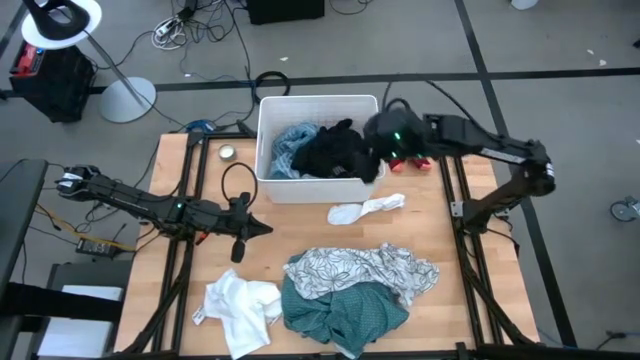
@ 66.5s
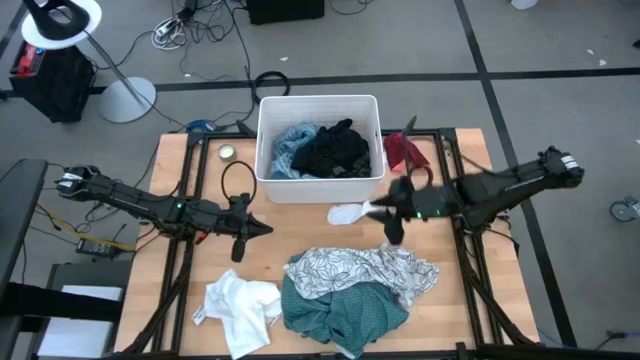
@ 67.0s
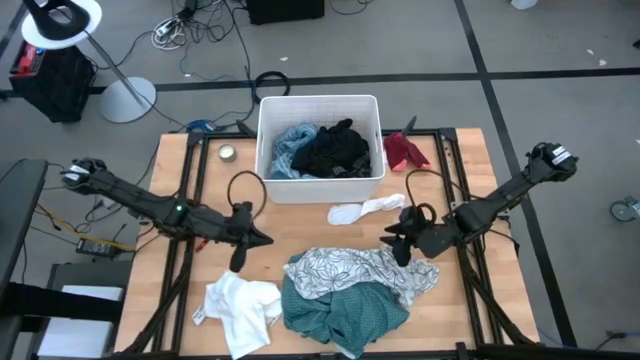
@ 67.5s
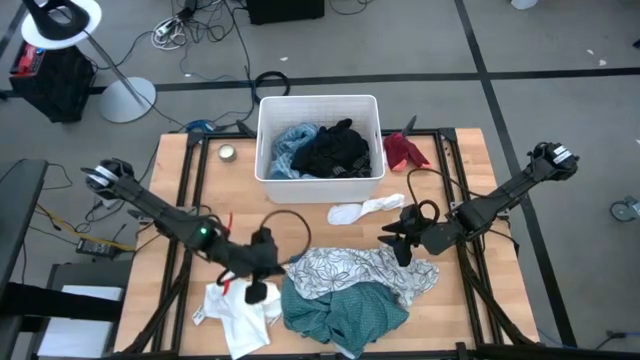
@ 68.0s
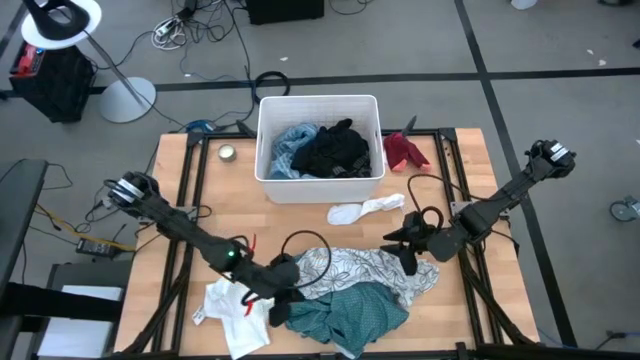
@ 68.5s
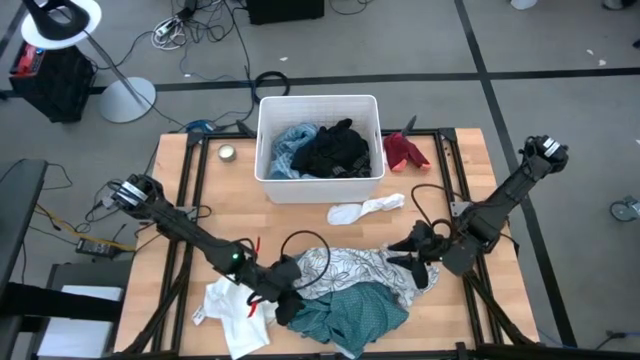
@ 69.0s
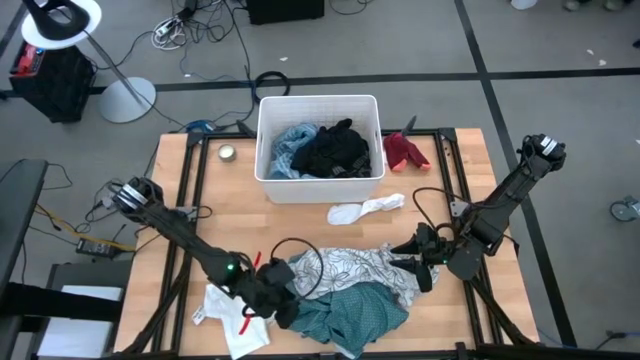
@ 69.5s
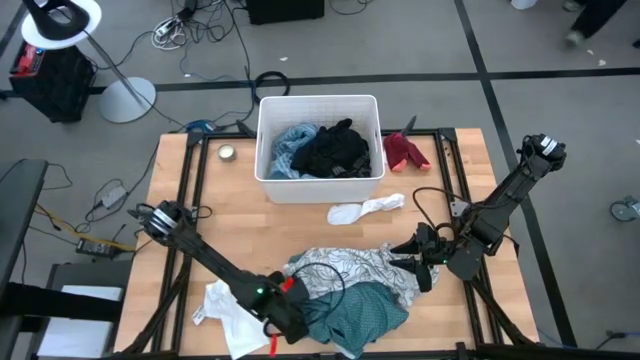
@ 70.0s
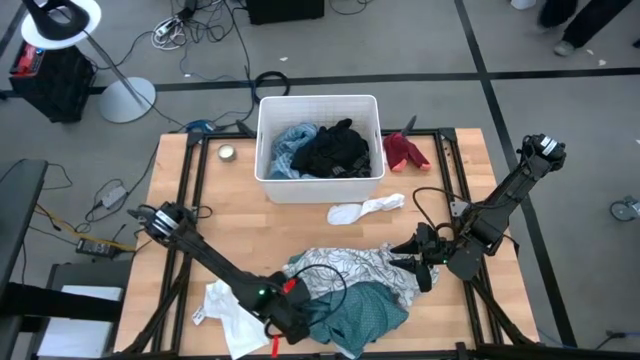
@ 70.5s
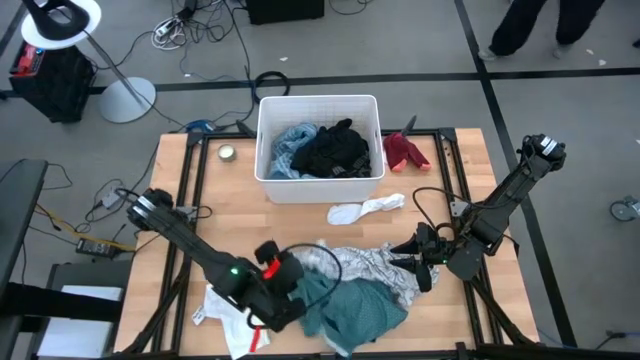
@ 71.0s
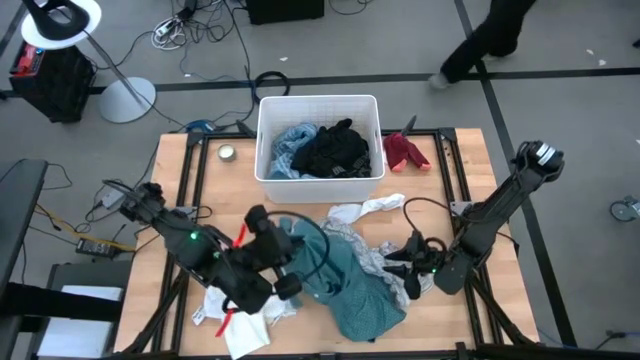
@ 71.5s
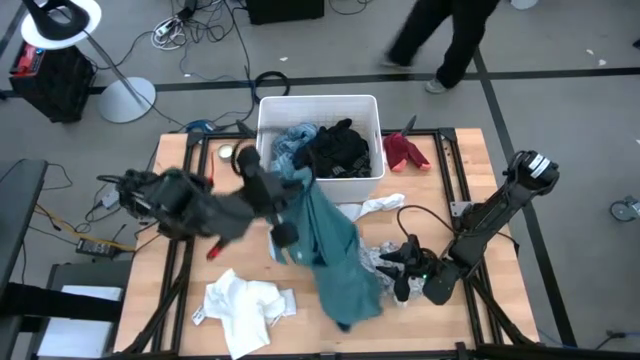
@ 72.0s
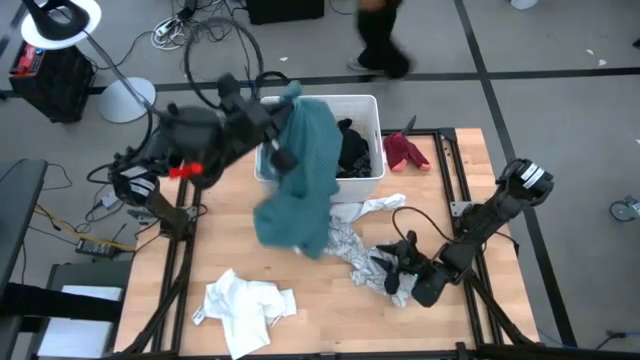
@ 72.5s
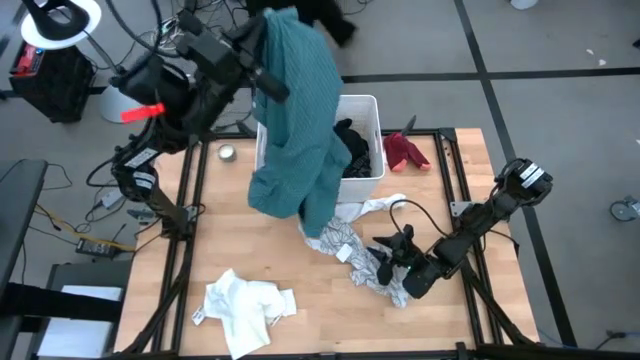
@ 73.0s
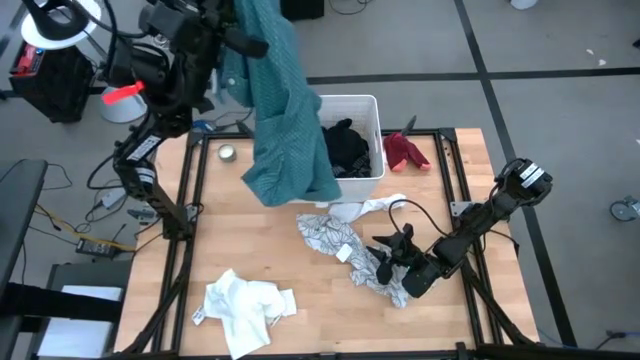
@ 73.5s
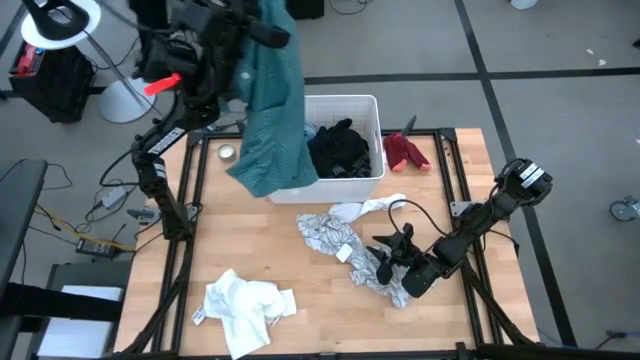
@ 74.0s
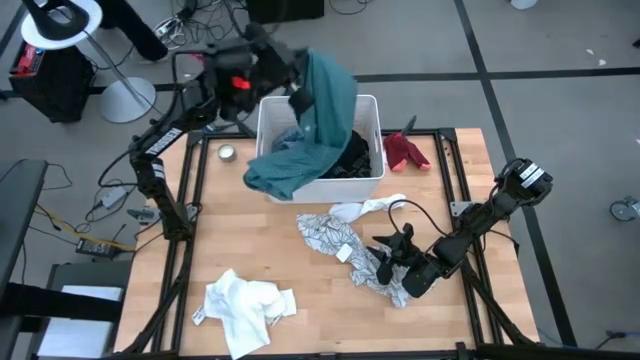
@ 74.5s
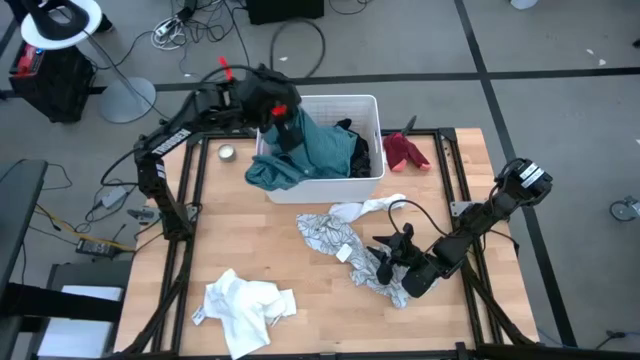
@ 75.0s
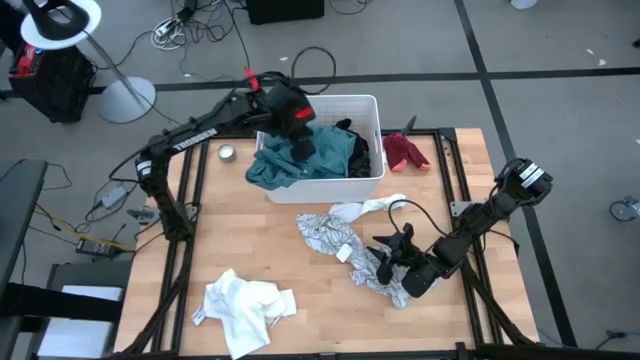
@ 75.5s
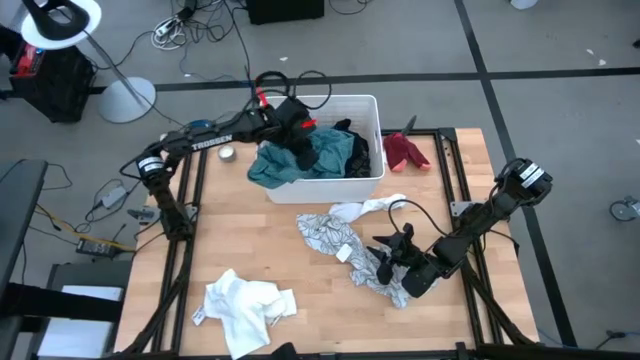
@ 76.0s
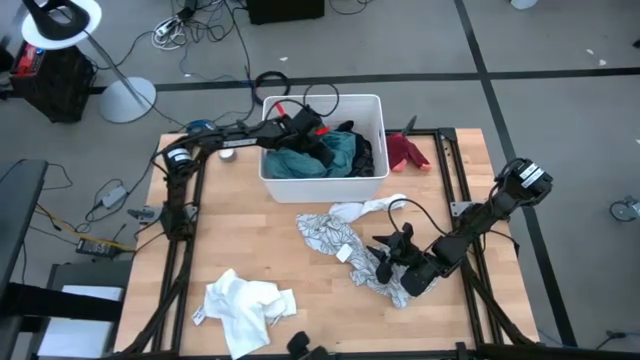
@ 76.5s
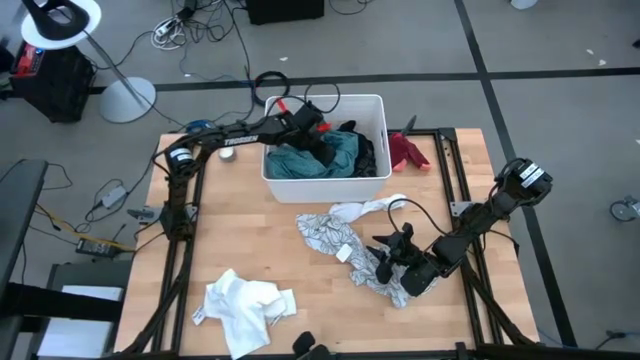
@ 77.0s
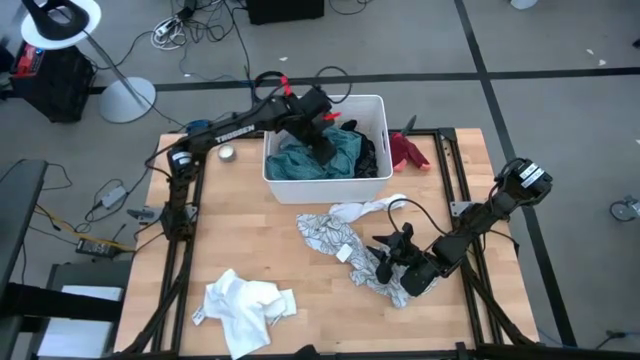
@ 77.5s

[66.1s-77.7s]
Task: Sort clothes
Put the green shirt into the white laundry organizer

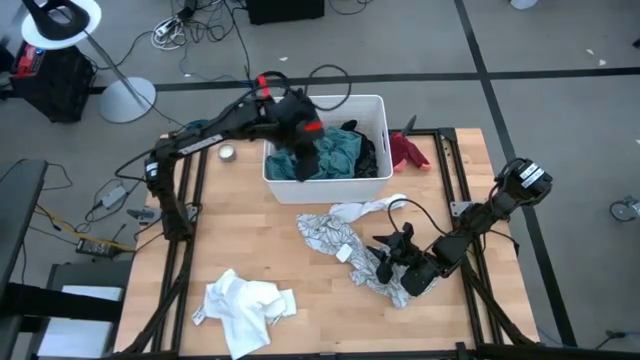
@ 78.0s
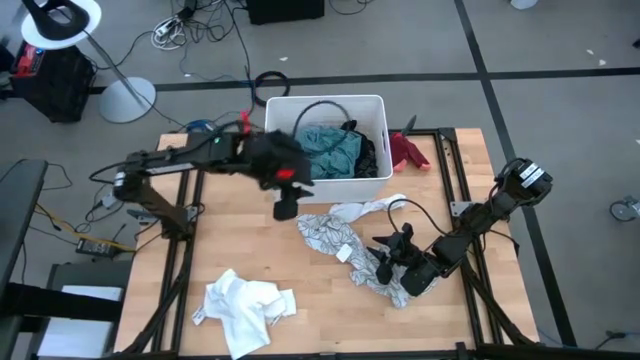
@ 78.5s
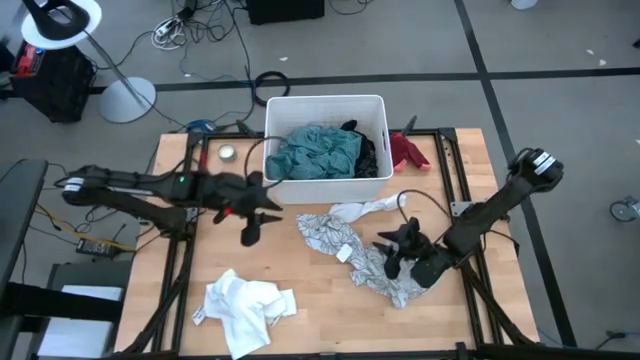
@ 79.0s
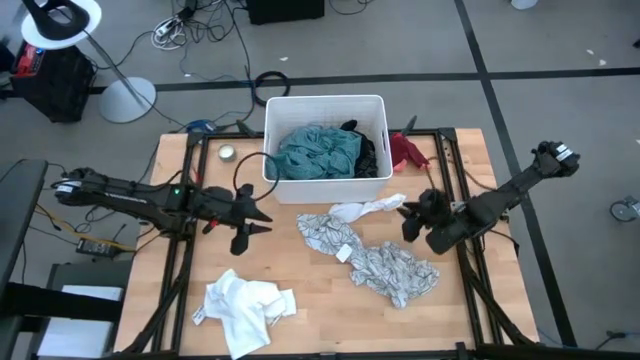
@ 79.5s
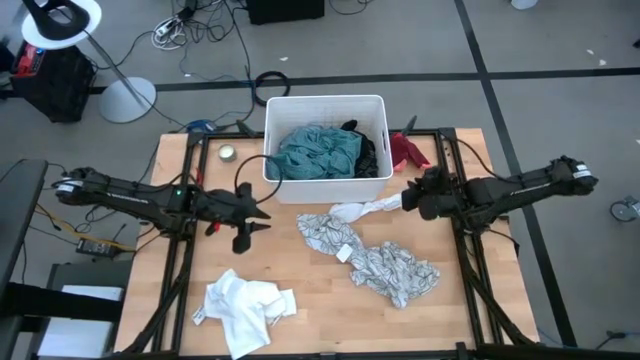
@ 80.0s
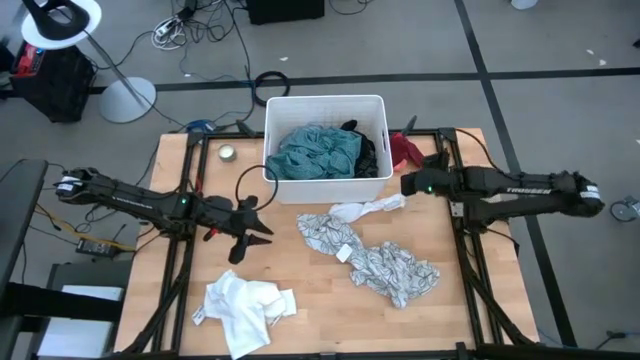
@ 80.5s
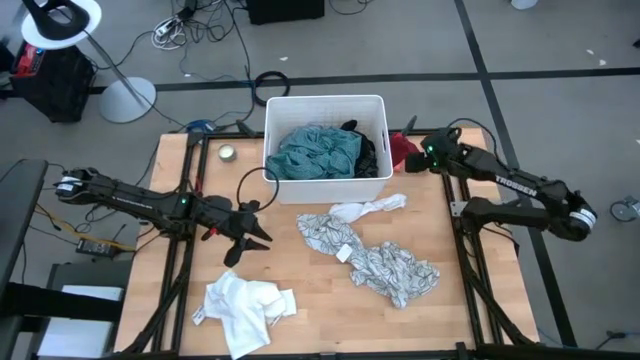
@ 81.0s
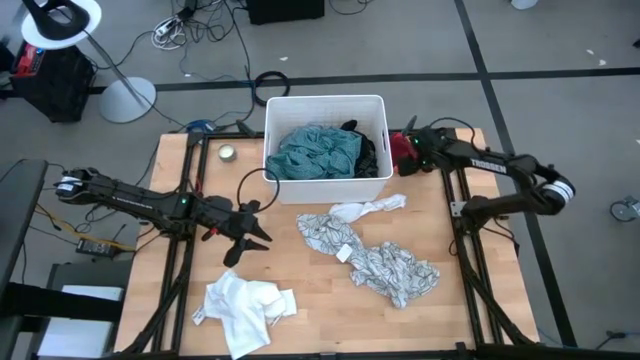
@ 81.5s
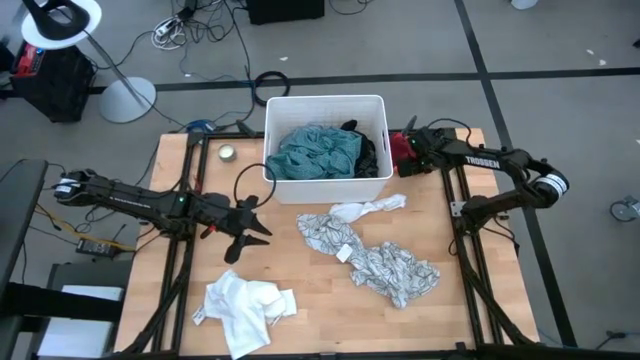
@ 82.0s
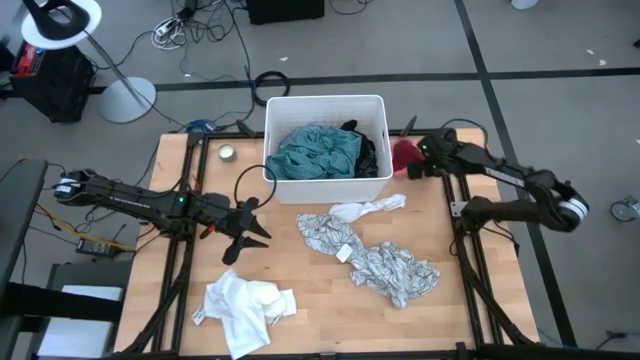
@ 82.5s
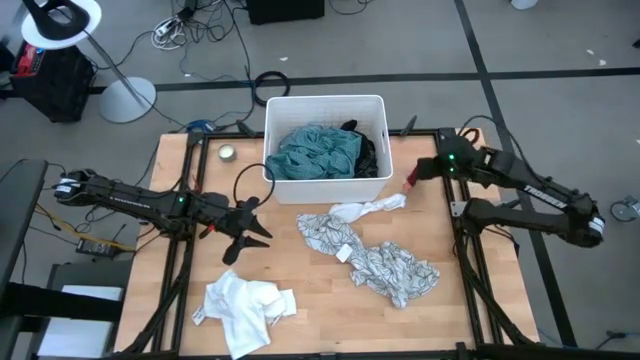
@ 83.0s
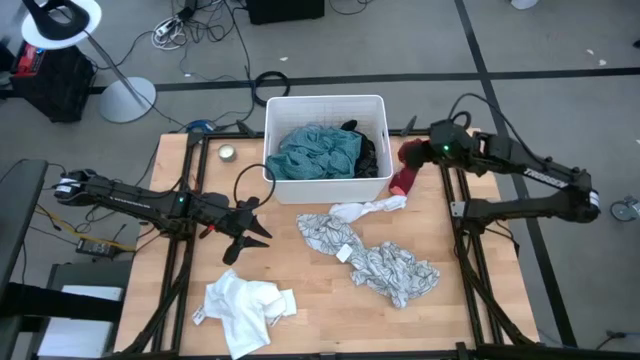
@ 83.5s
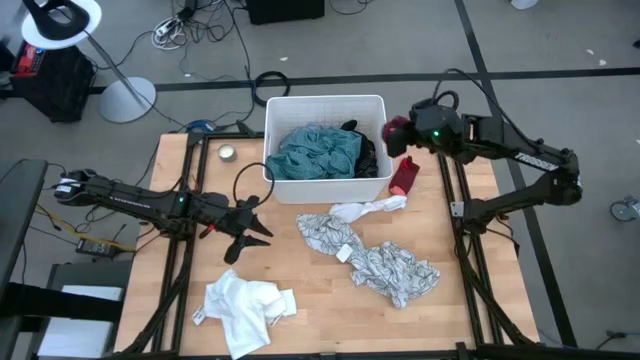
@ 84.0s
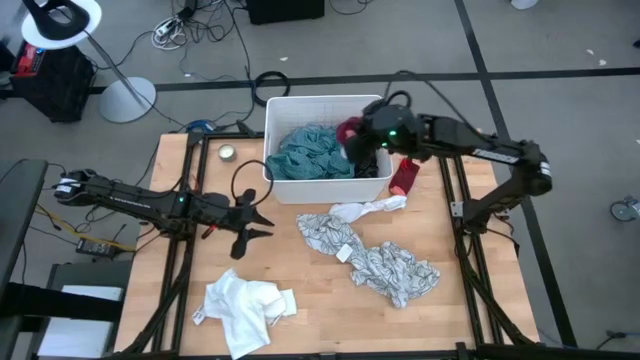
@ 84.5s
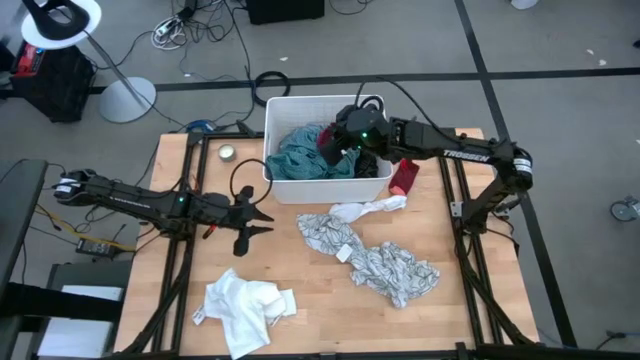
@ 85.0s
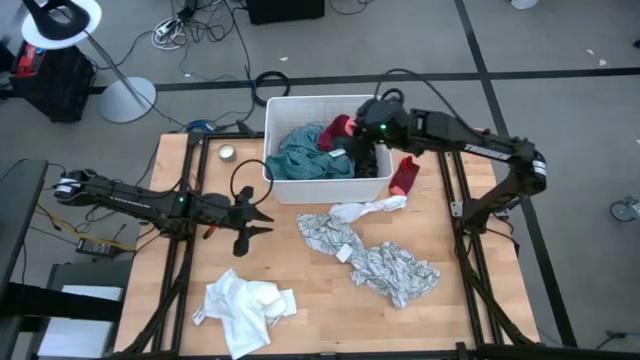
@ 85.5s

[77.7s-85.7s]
Put the right red sock into the white laundry organizer
